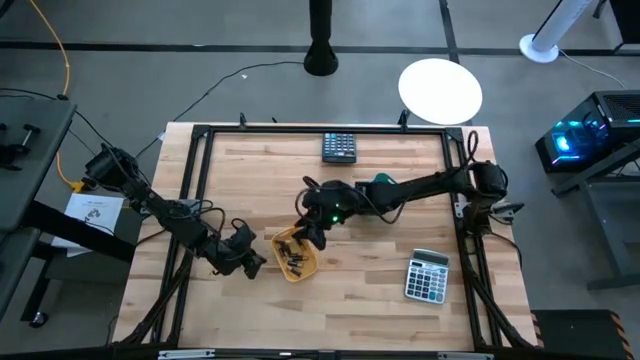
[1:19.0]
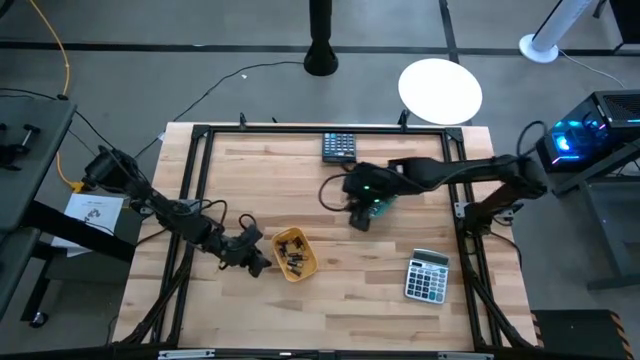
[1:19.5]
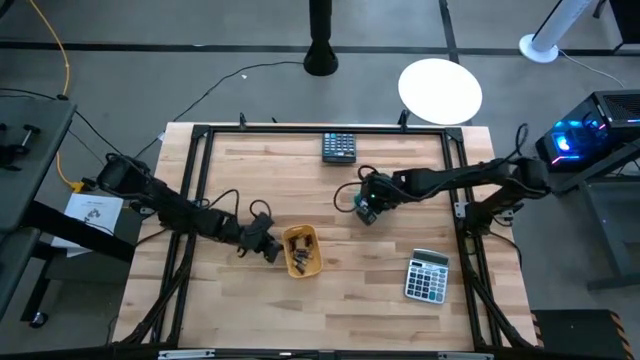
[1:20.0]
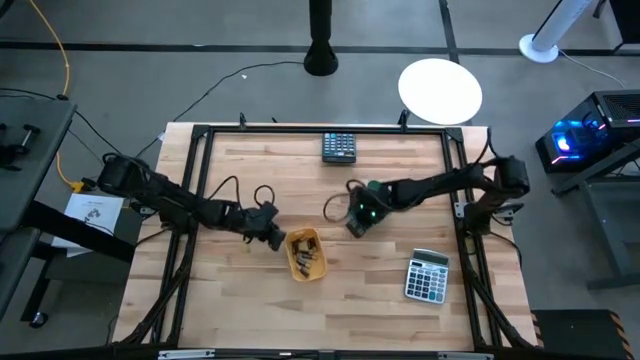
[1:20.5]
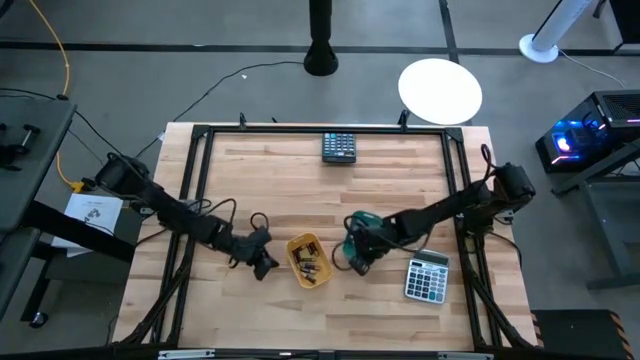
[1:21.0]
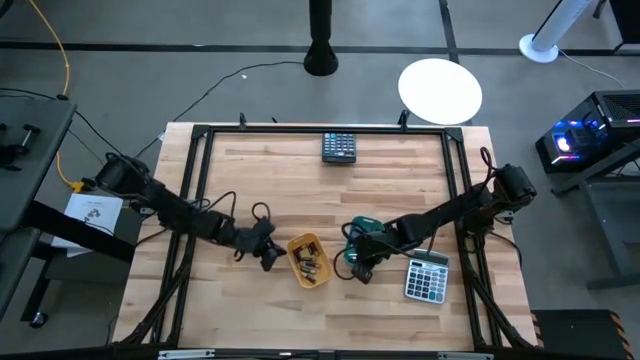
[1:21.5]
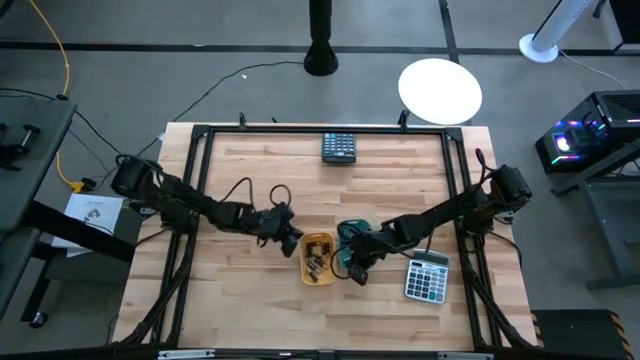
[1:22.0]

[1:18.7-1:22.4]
Task: Sort batteries
Move the bins to the center of the table

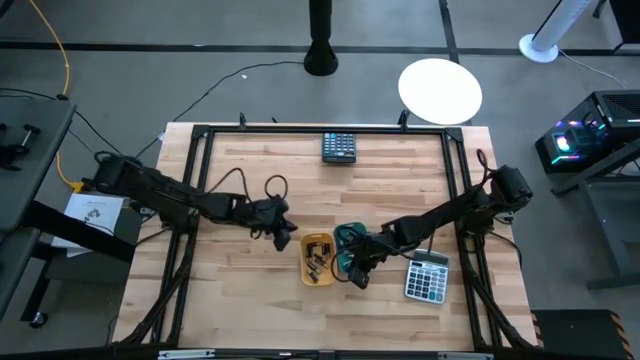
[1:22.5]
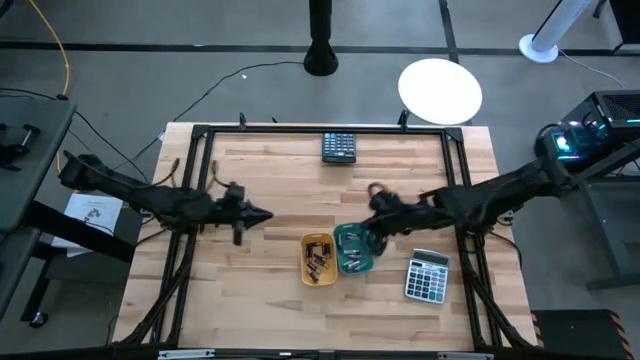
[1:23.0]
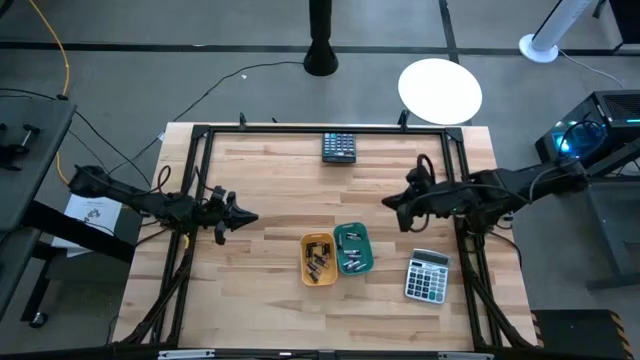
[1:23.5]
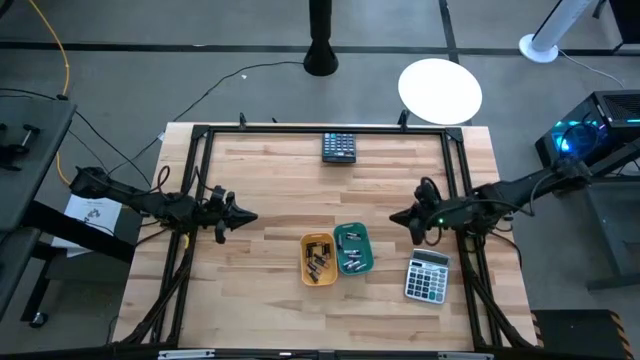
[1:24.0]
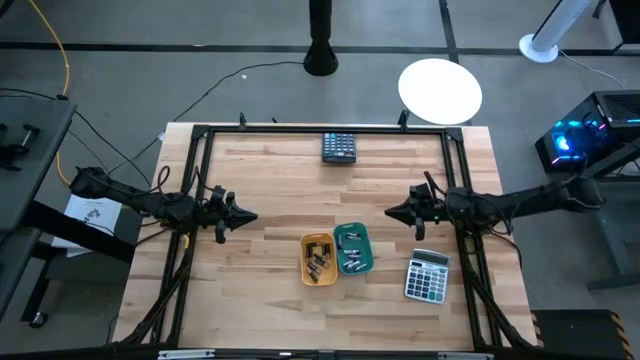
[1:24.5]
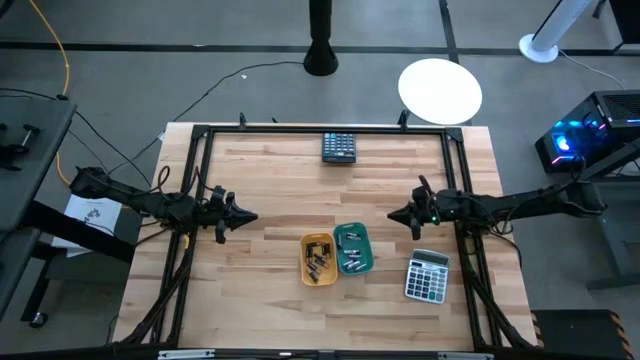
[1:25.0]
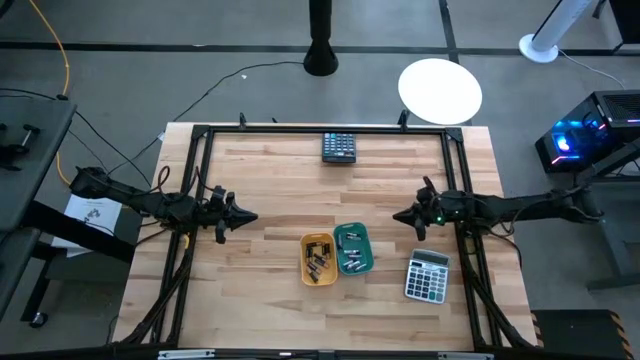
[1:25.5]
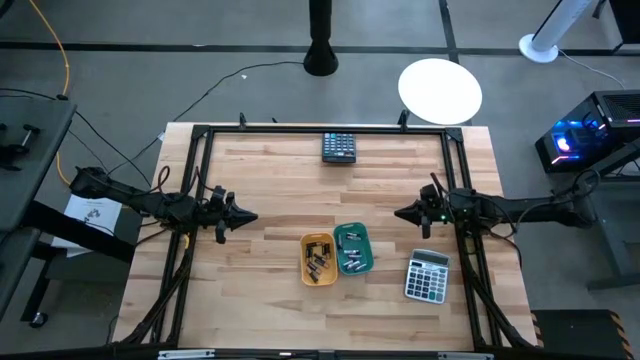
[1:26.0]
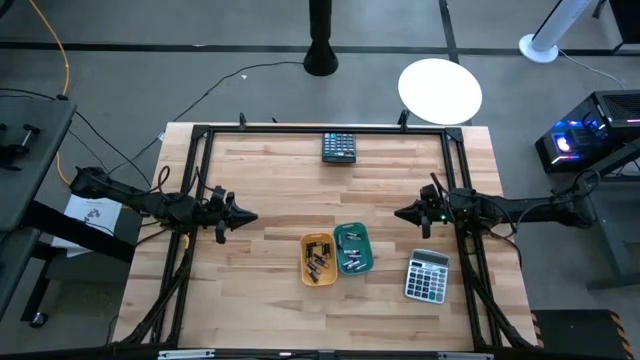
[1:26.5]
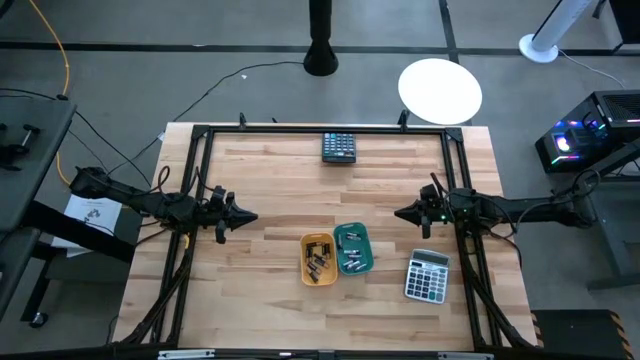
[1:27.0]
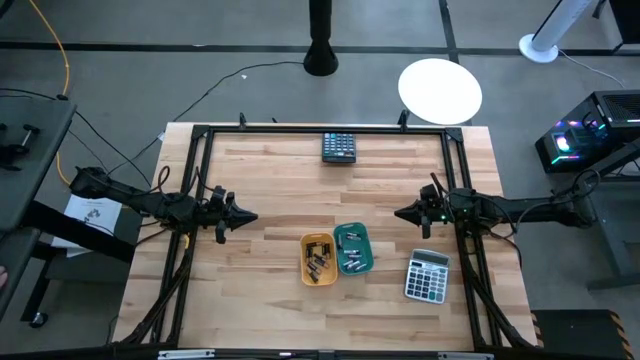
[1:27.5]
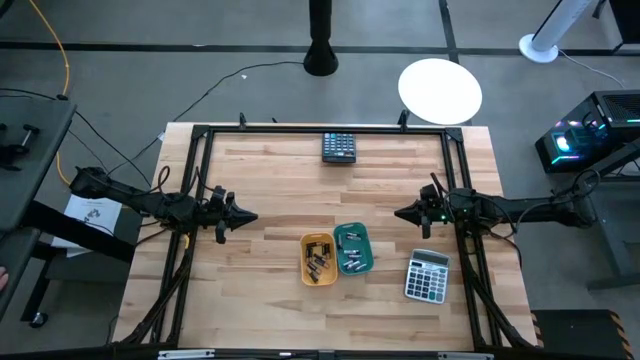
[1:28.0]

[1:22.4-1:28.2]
Return to Home Position

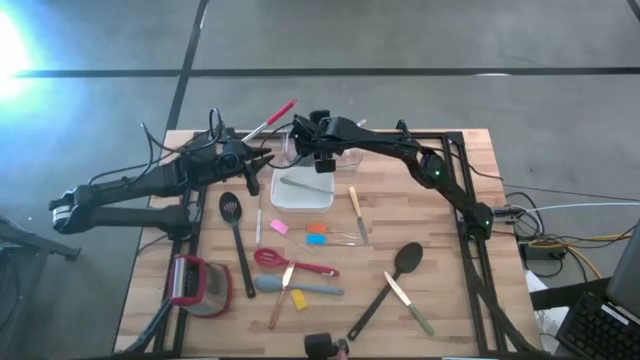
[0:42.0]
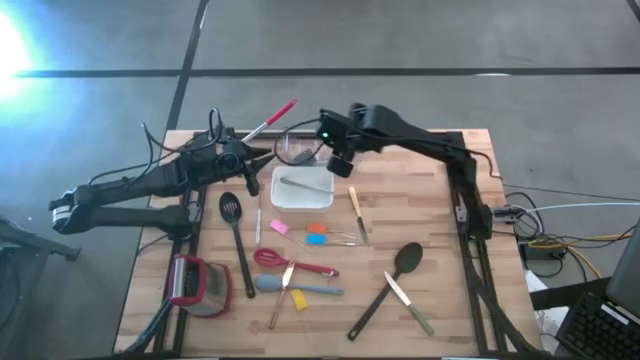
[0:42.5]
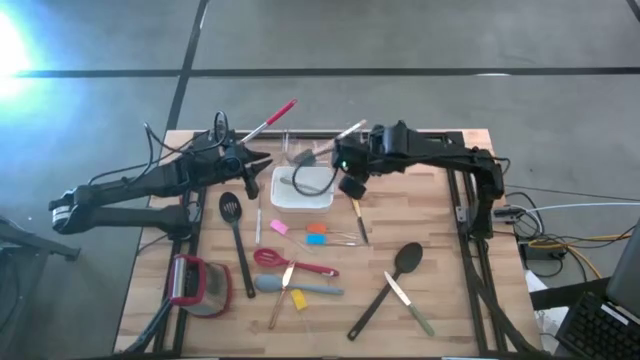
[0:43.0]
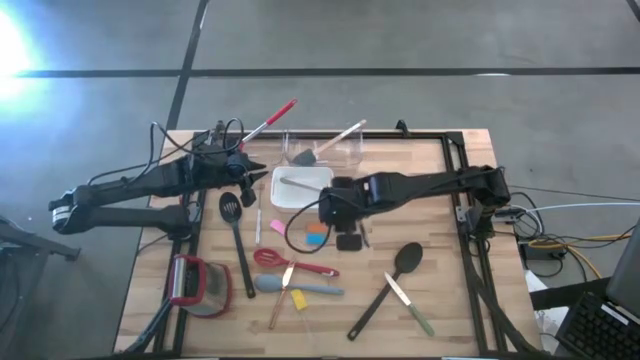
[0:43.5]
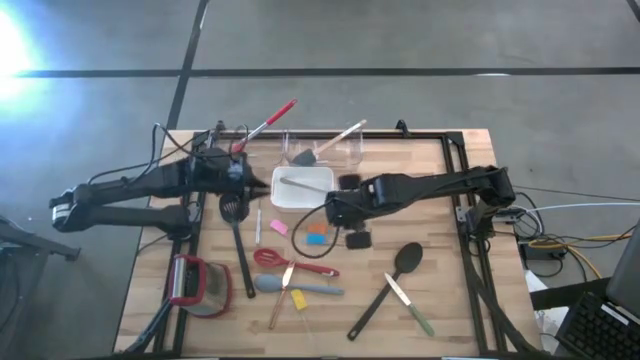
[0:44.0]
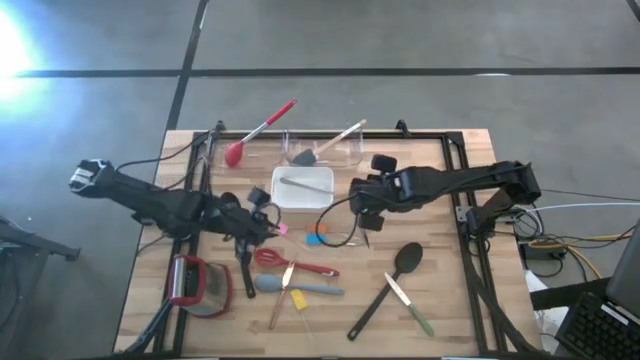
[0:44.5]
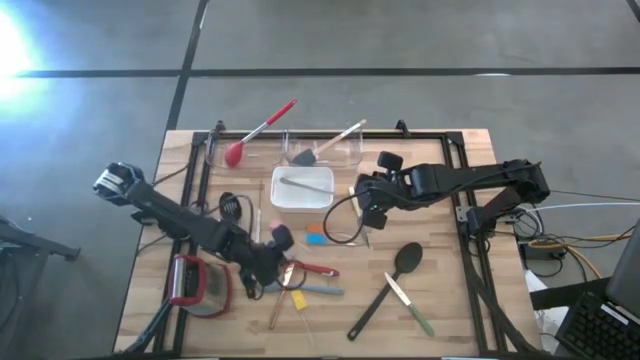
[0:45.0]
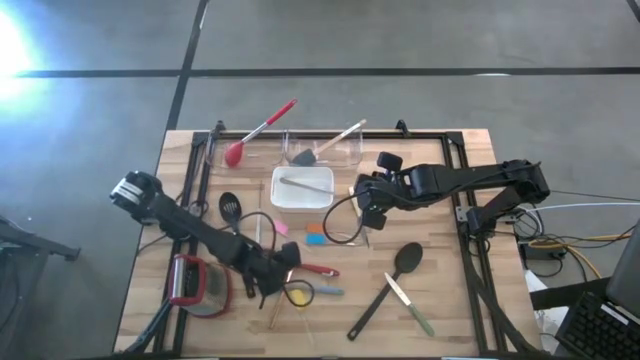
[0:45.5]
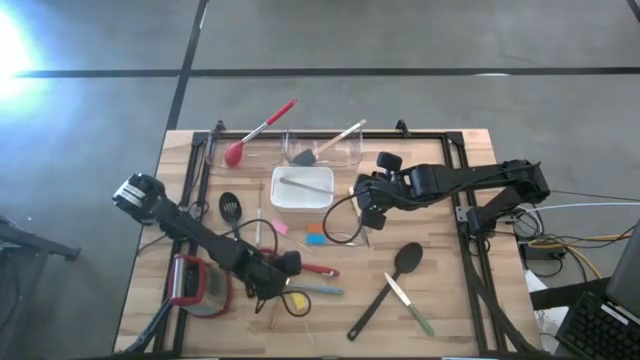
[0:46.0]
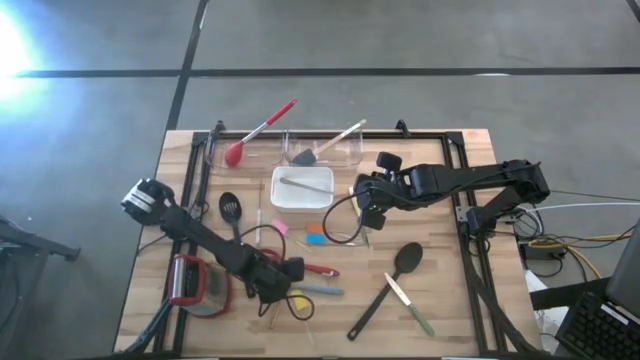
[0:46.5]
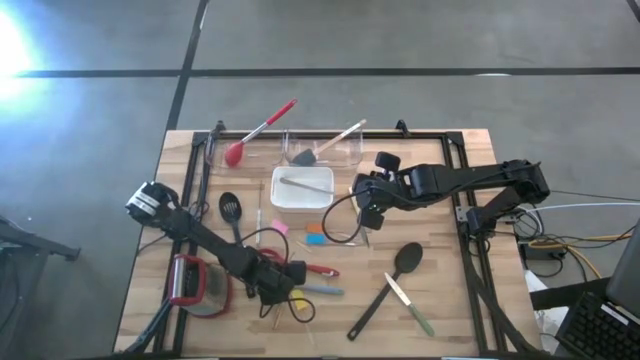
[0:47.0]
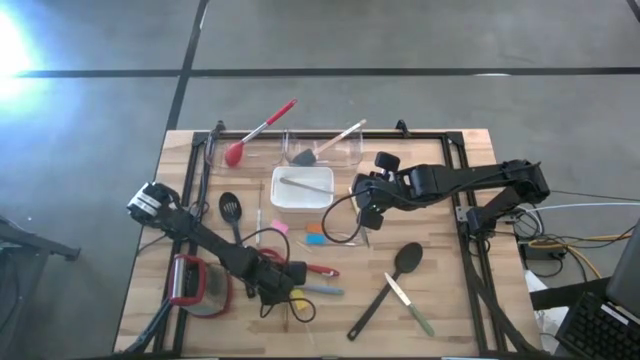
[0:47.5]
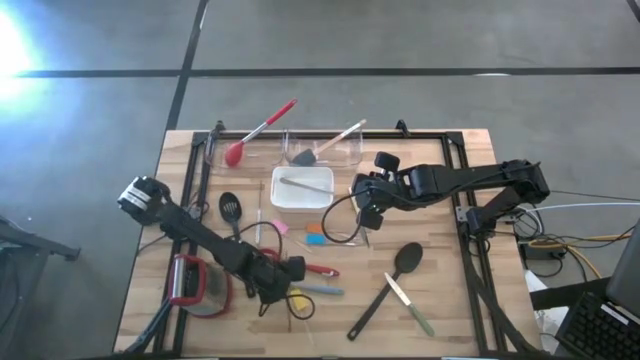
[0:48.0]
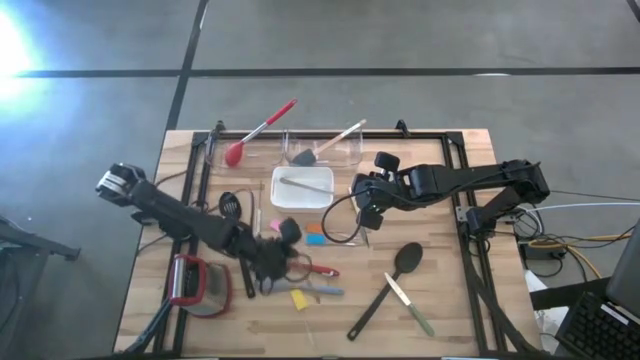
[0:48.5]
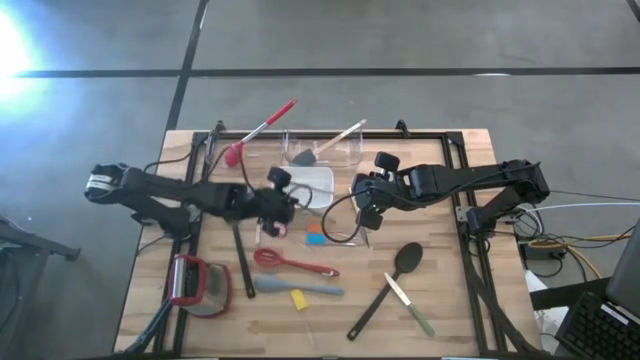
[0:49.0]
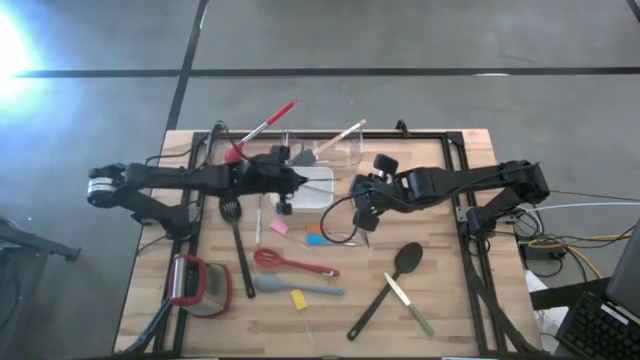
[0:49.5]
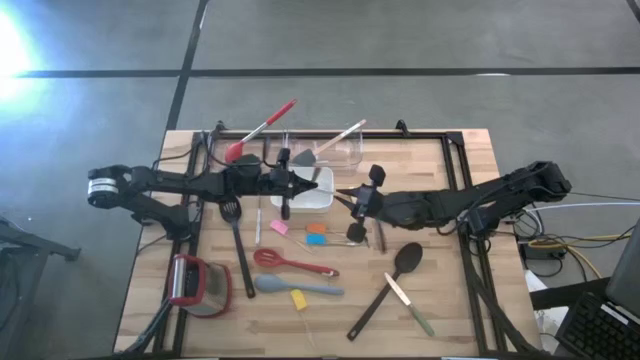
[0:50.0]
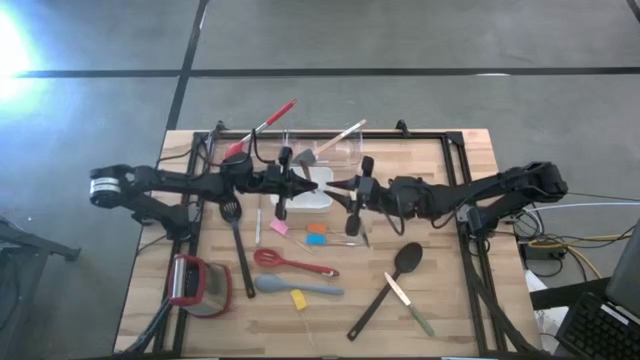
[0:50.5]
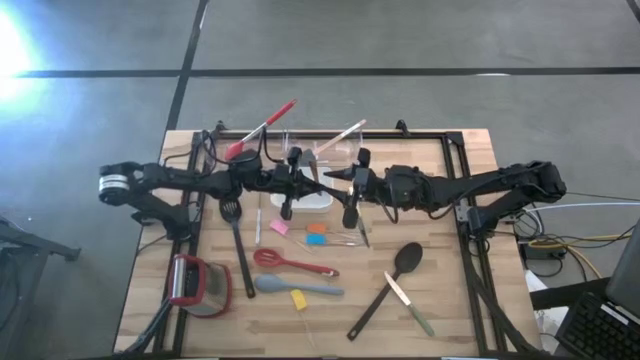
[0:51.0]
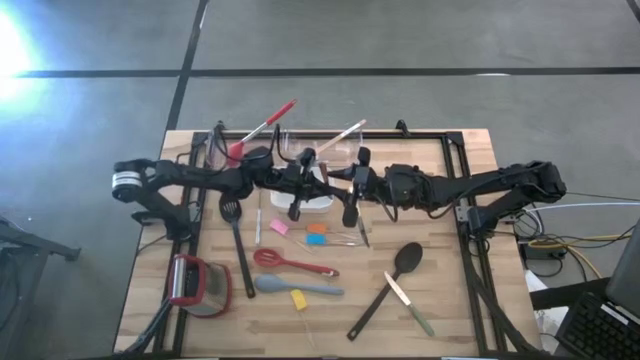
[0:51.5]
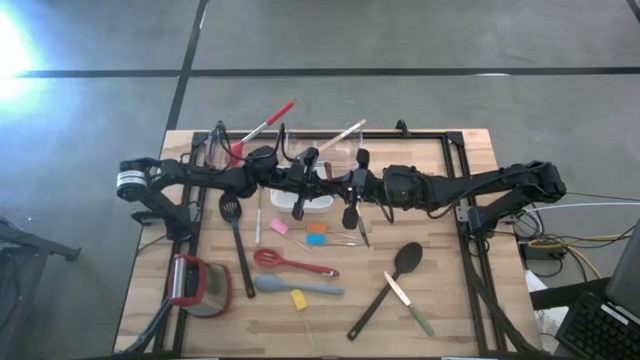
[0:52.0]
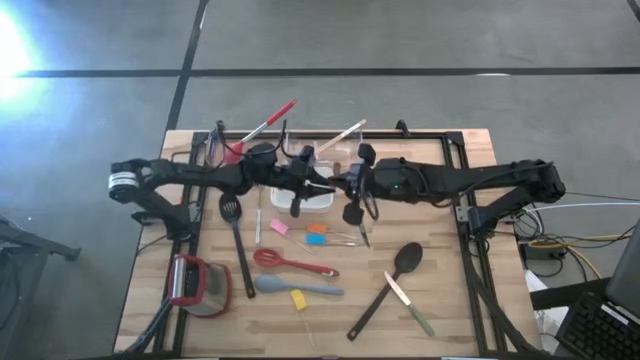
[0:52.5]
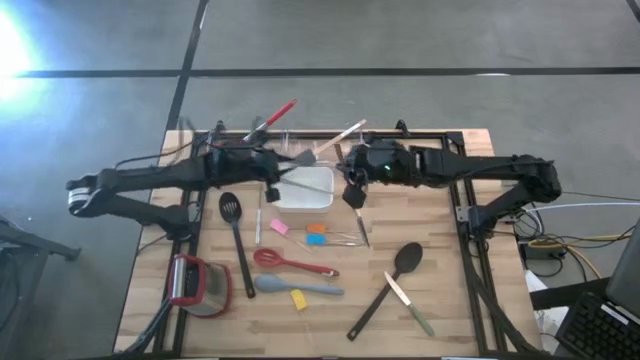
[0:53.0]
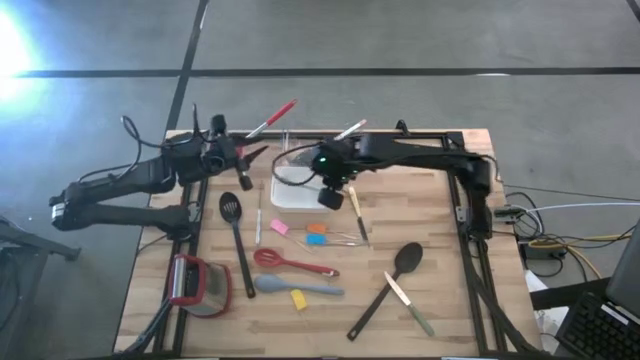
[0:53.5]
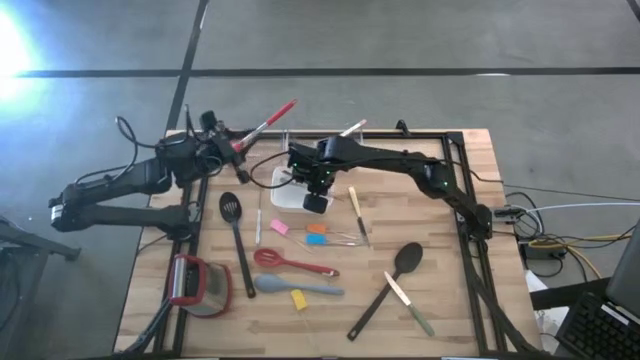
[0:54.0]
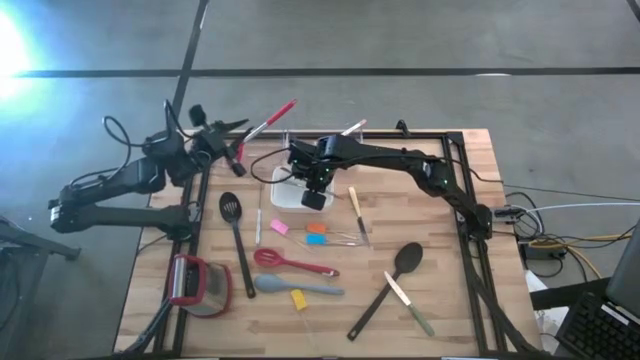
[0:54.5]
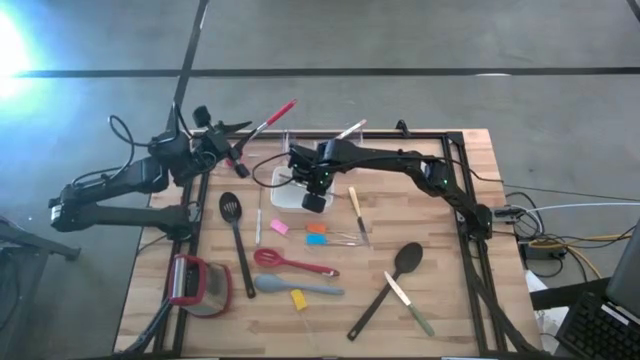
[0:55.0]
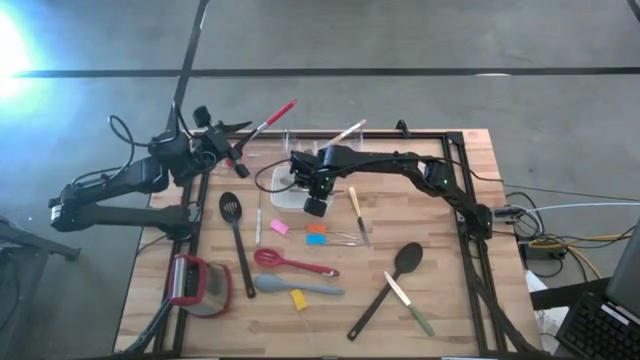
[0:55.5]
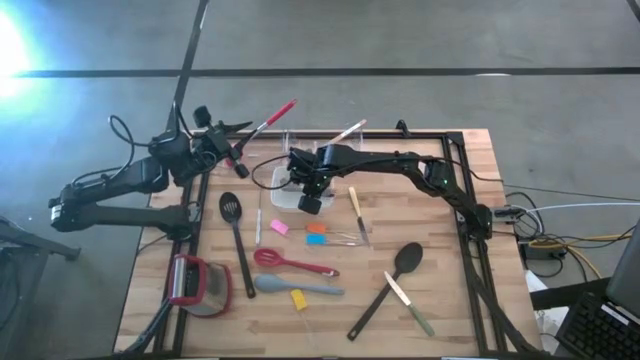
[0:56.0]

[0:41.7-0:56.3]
Task: Pick & Place Kitchen Items
Put the golden knife into the white bin
